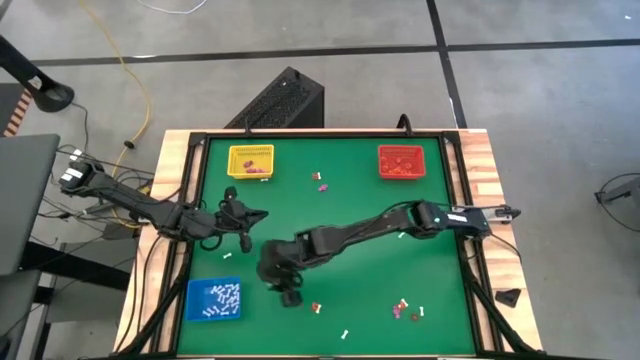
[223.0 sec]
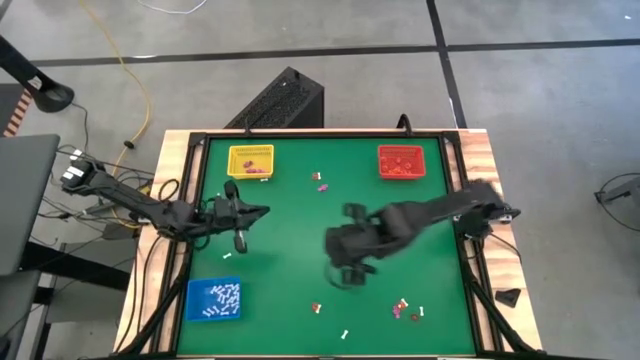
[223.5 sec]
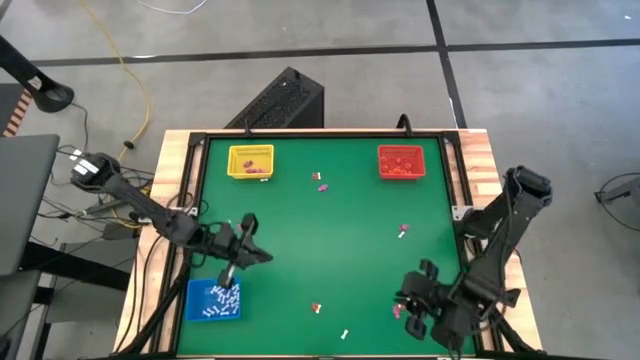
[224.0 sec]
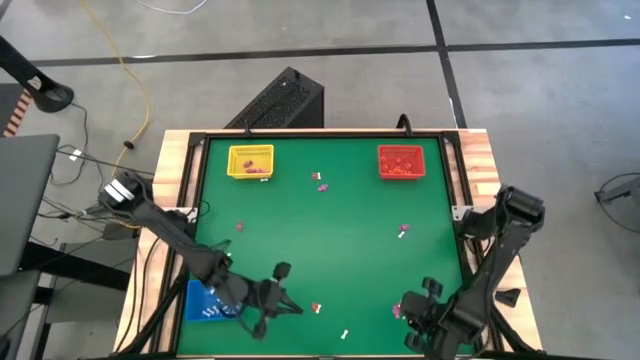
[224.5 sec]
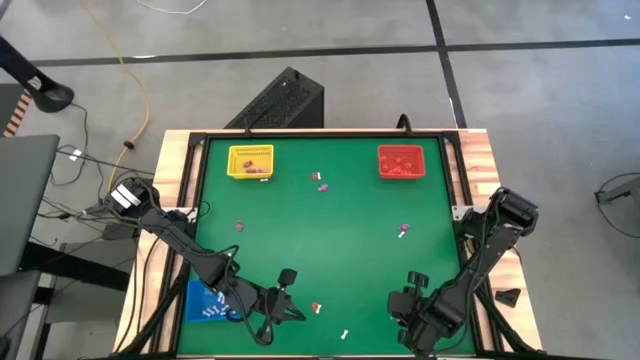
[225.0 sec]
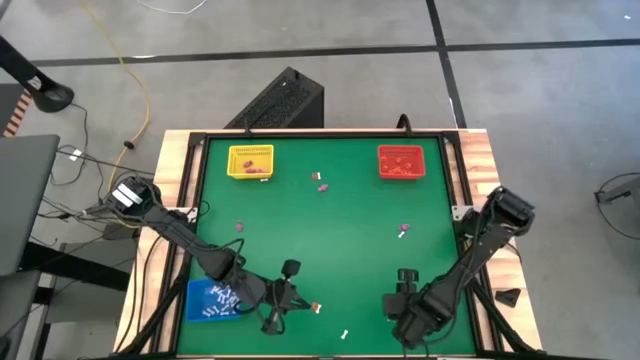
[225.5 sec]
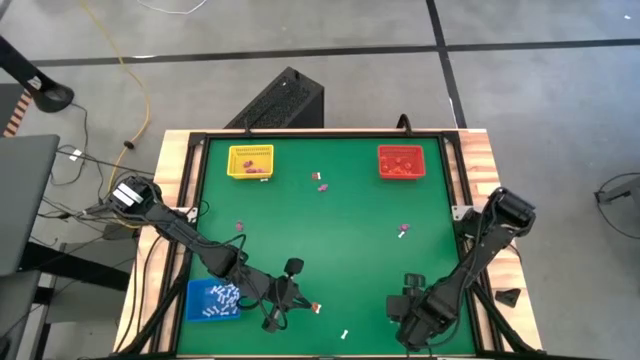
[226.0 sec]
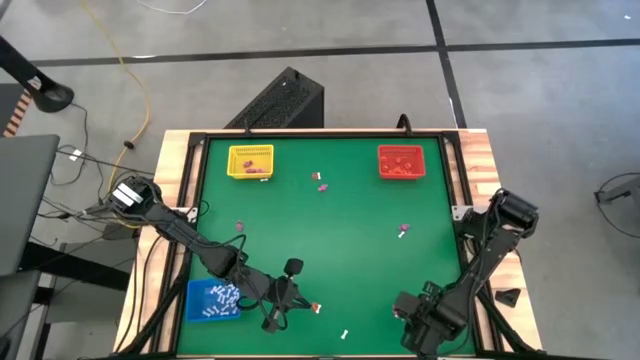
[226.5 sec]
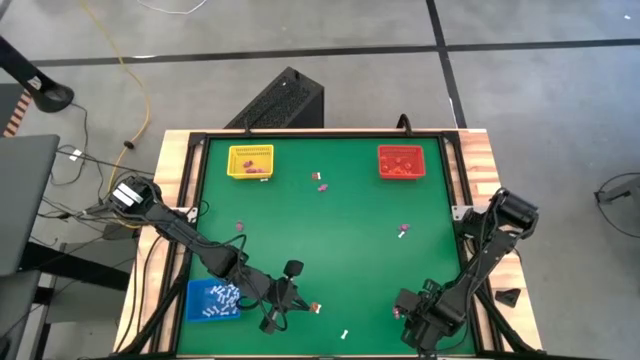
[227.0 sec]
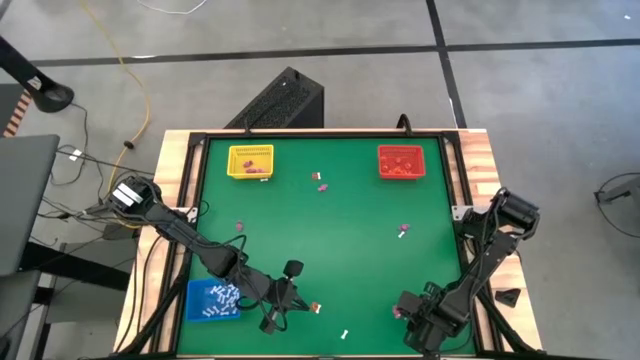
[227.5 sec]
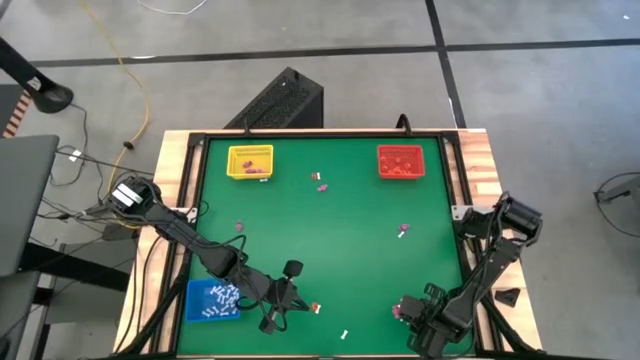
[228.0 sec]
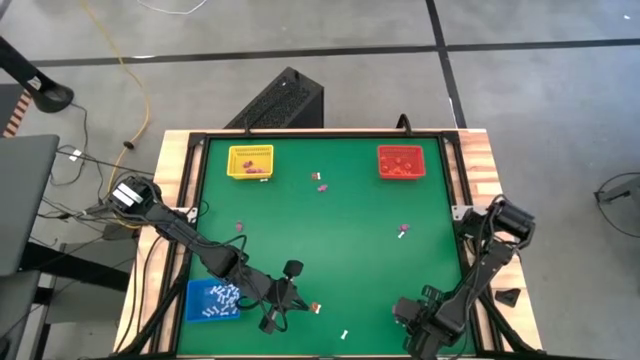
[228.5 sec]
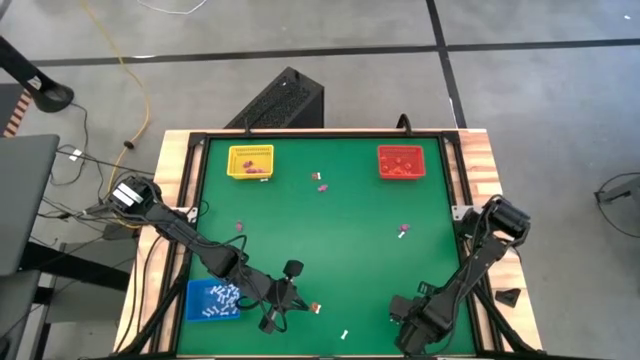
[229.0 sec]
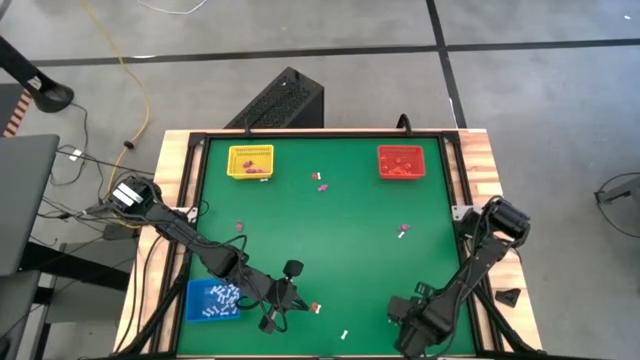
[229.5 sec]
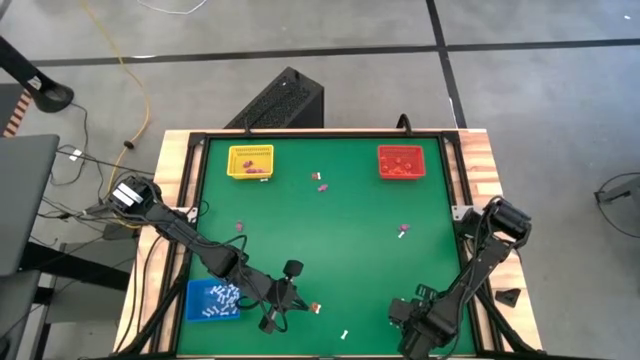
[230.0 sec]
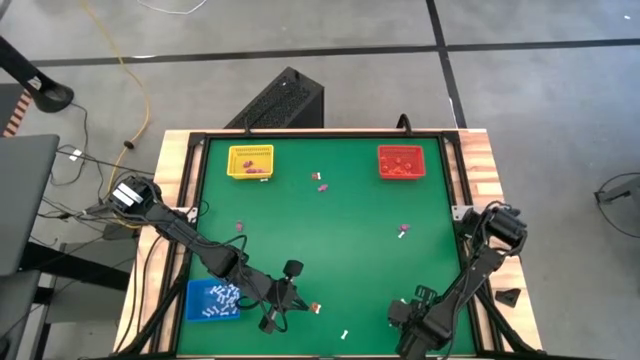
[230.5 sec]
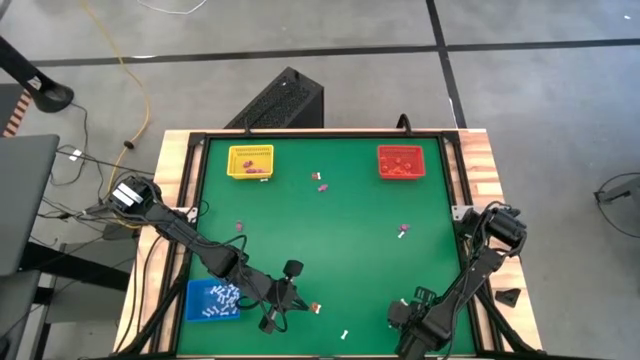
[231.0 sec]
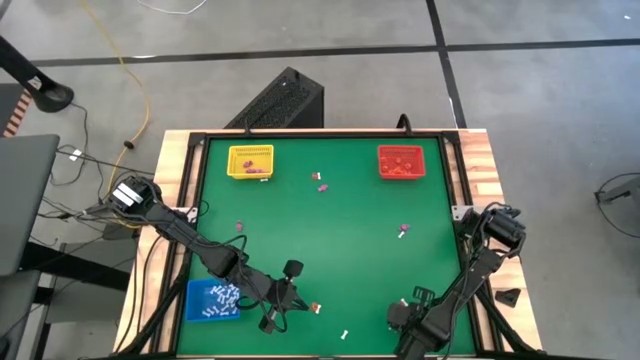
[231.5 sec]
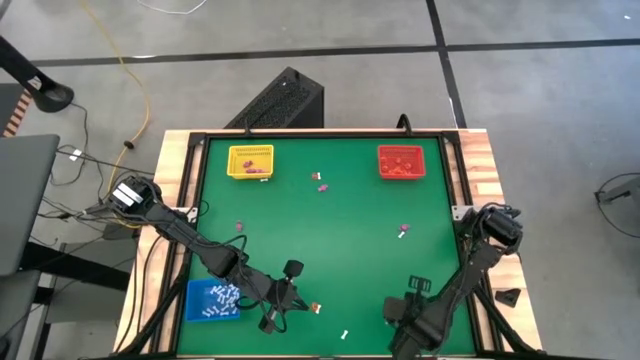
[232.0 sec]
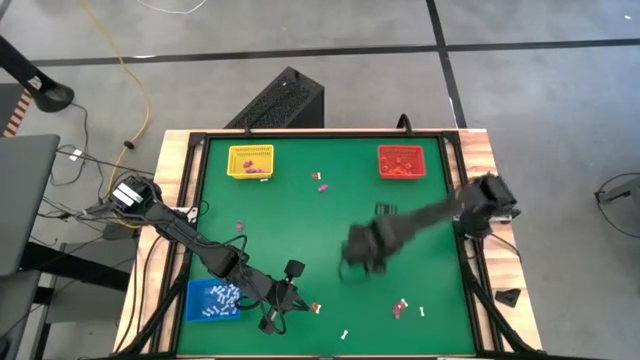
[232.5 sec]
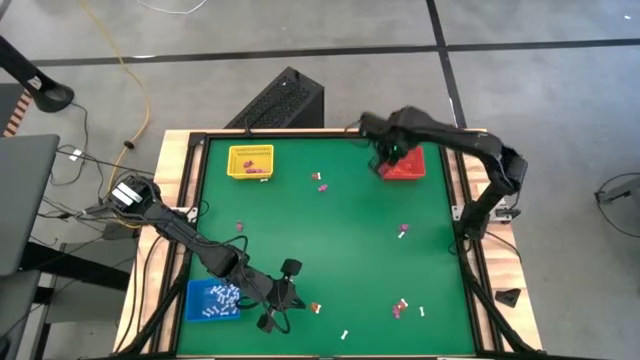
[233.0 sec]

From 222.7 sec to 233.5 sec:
Task: Sort Halloween decoration
Put the pumpkin toy into the orange bin

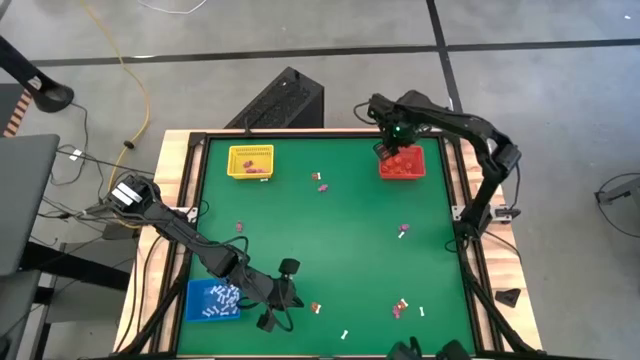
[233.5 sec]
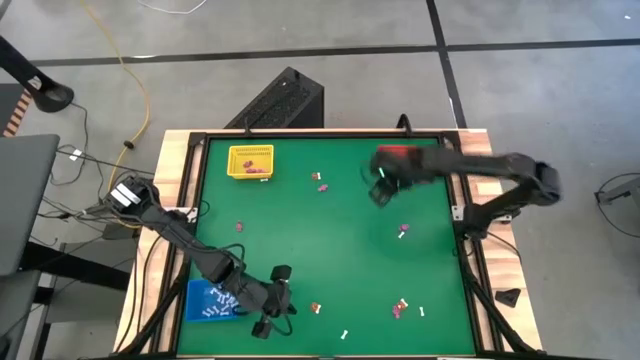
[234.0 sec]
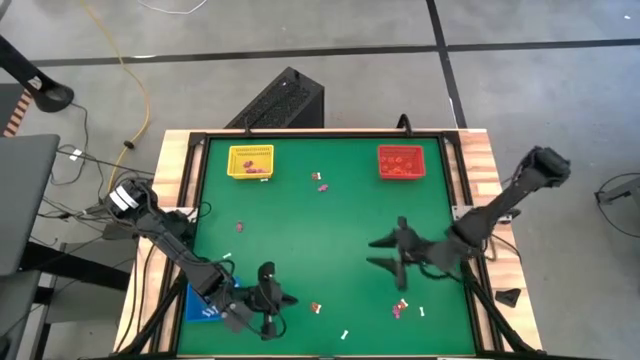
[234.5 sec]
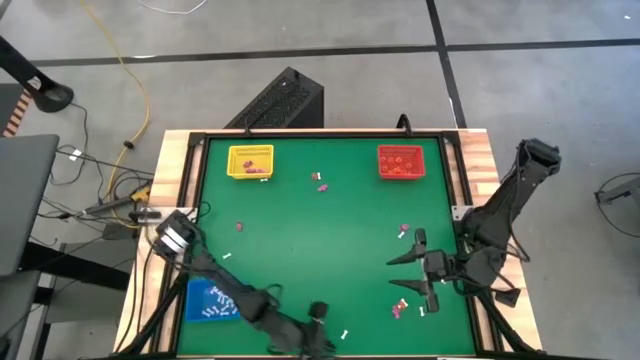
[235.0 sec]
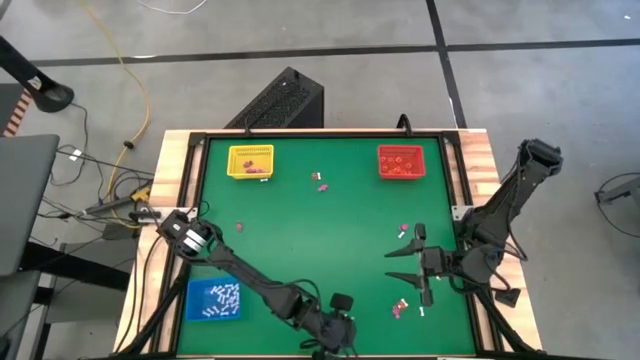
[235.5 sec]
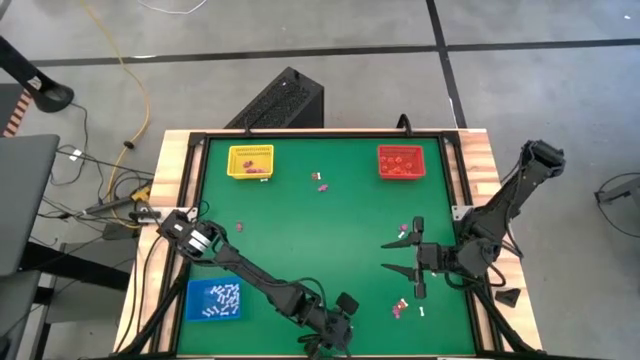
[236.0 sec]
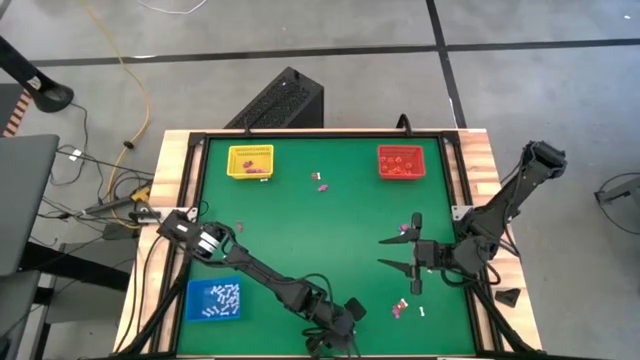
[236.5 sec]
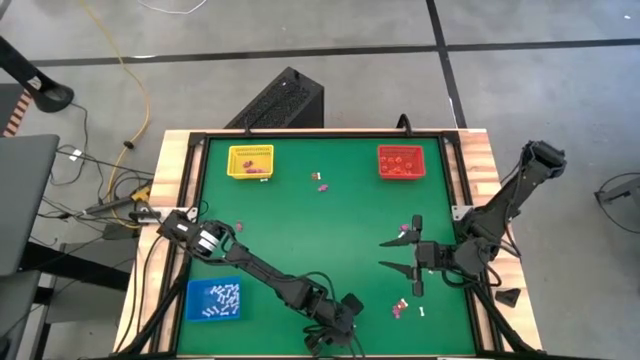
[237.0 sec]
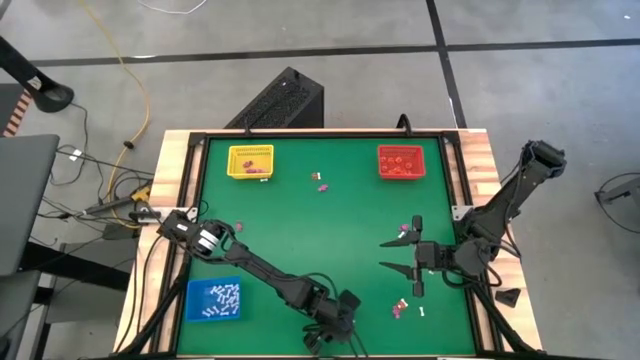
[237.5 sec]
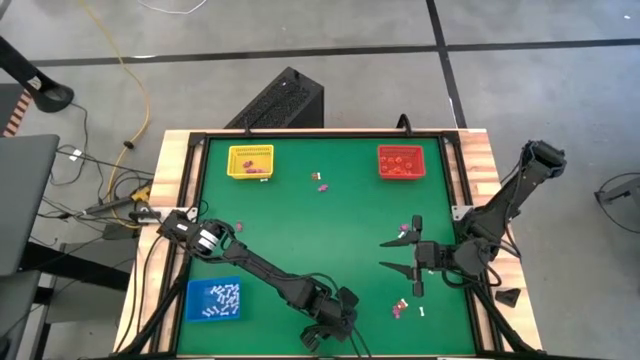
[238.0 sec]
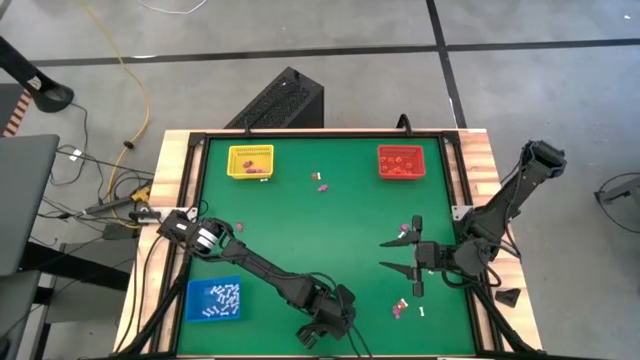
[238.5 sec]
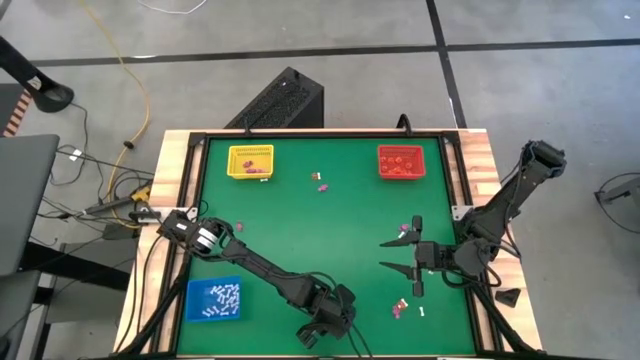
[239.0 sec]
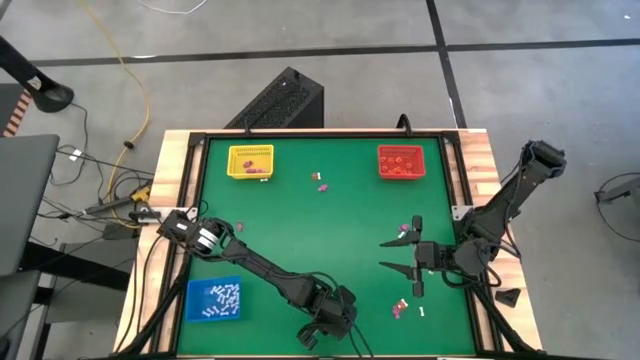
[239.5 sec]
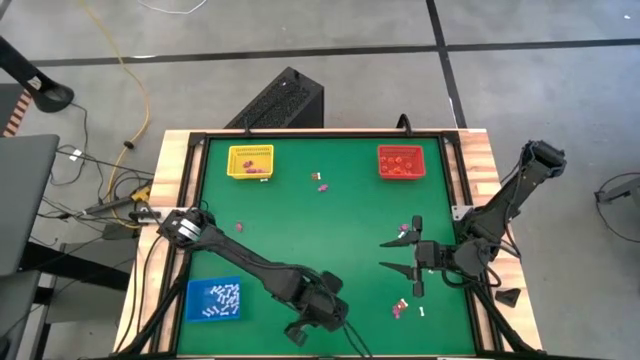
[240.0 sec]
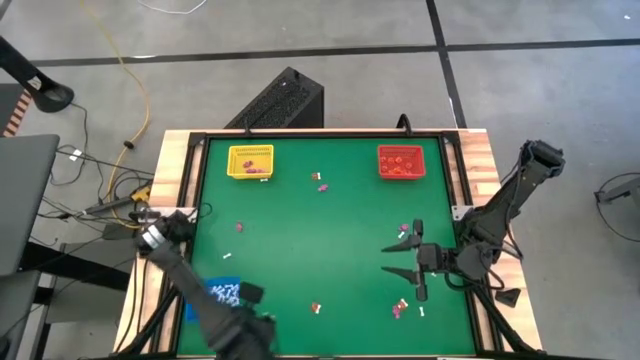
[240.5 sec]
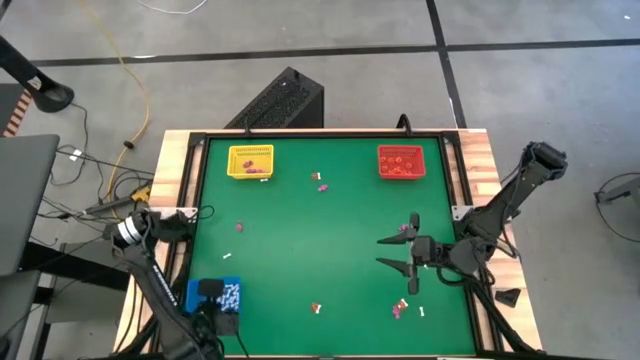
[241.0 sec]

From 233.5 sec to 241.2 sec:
Put the white bone toy into the blue bin
